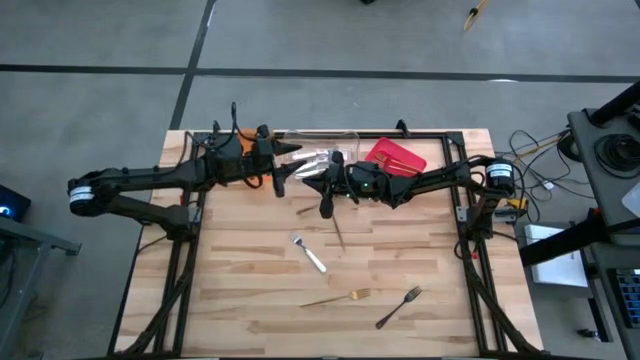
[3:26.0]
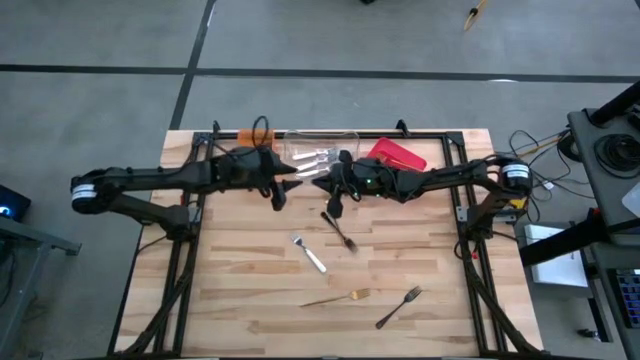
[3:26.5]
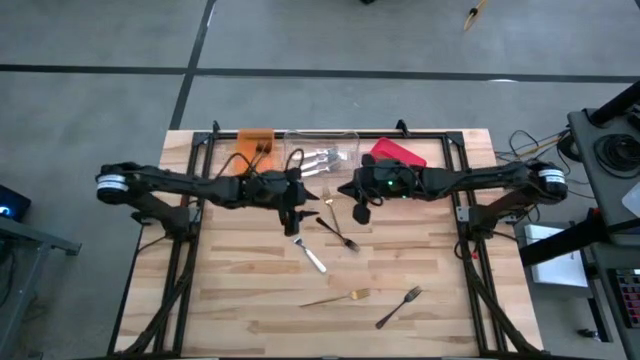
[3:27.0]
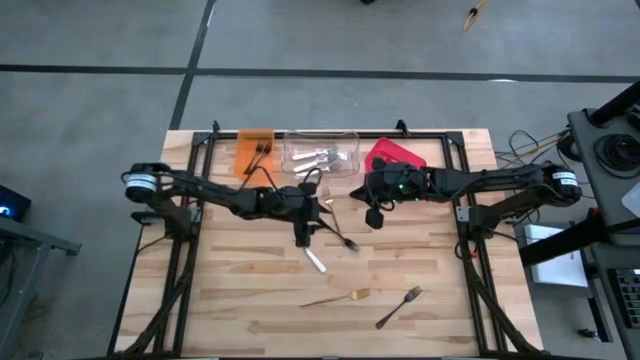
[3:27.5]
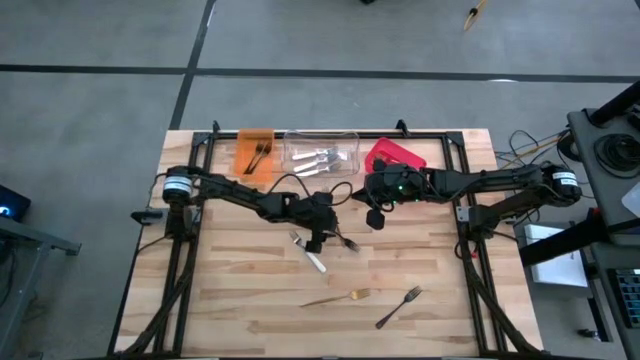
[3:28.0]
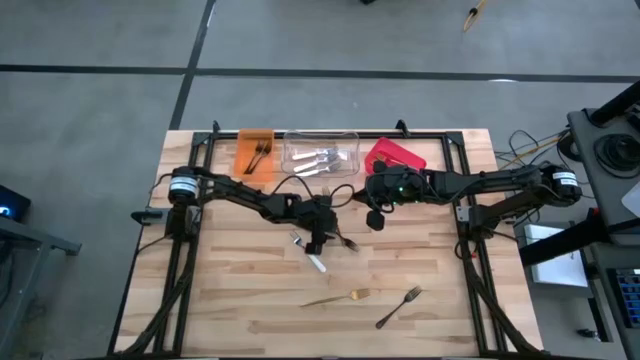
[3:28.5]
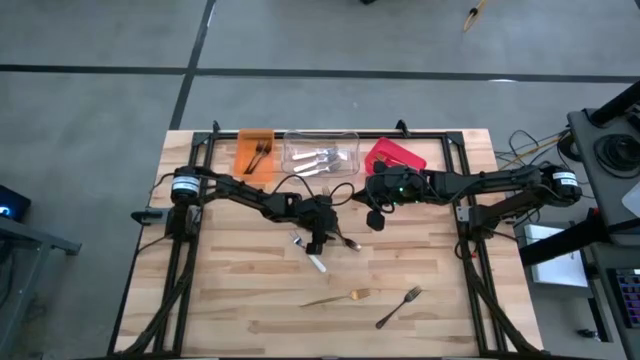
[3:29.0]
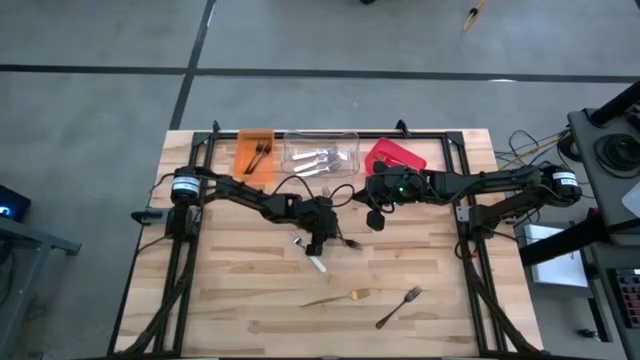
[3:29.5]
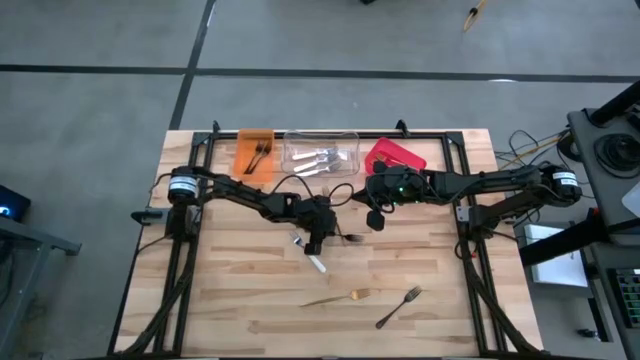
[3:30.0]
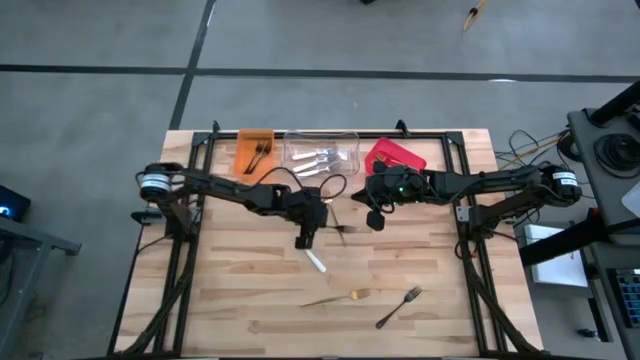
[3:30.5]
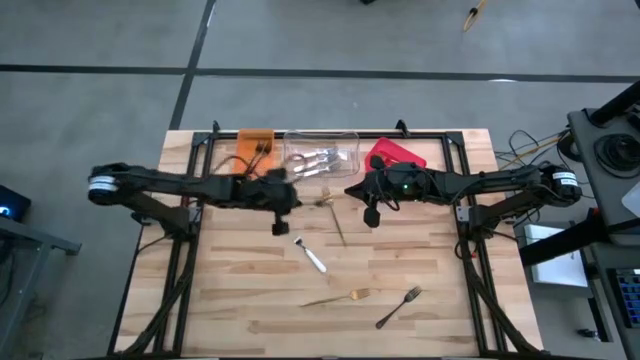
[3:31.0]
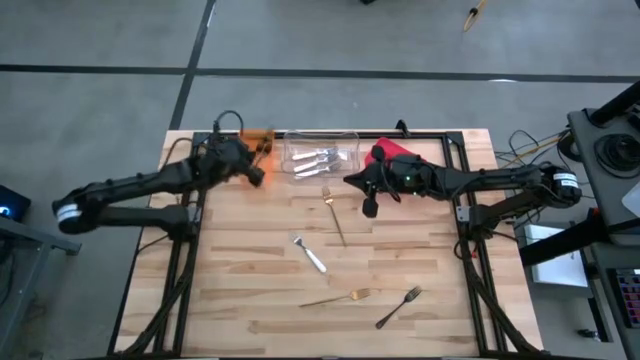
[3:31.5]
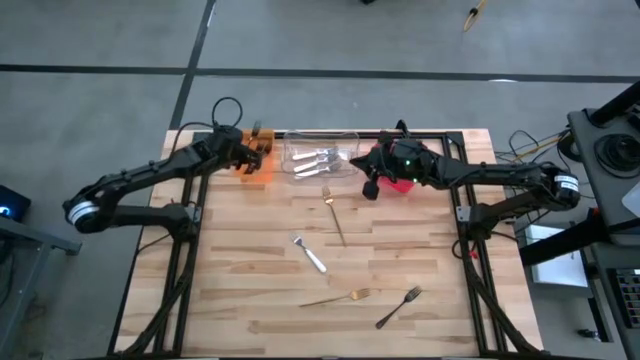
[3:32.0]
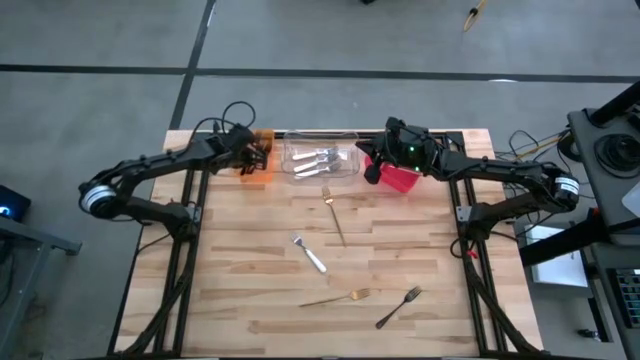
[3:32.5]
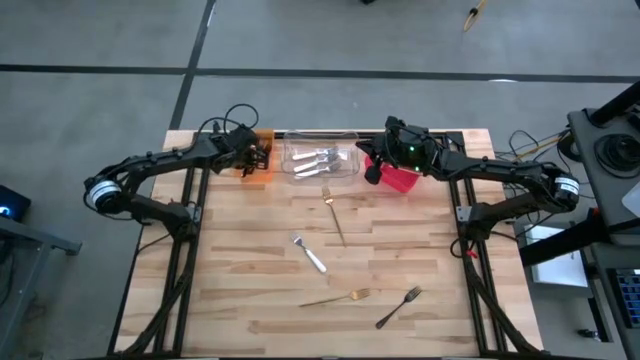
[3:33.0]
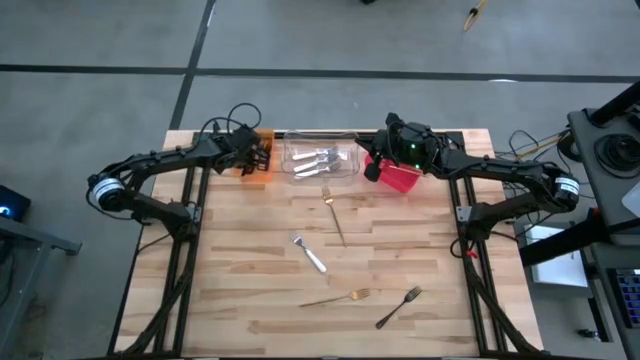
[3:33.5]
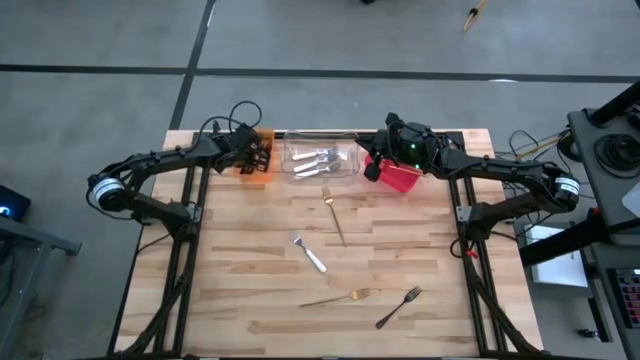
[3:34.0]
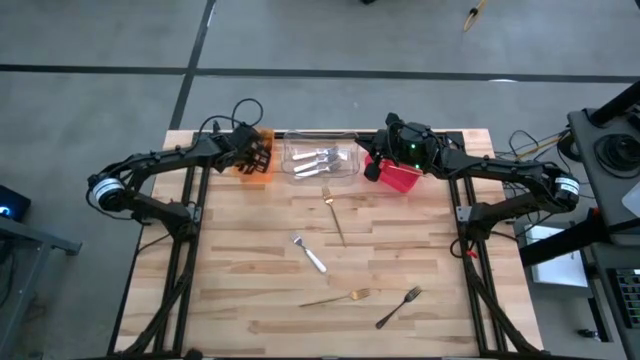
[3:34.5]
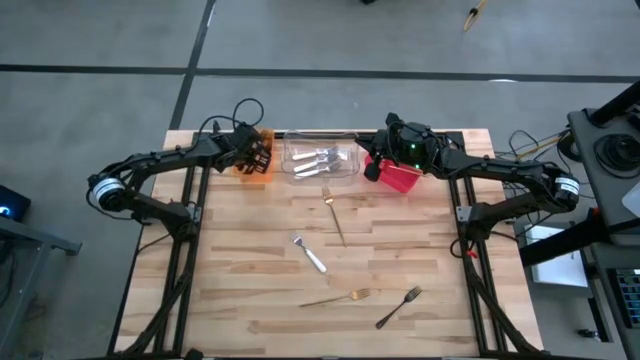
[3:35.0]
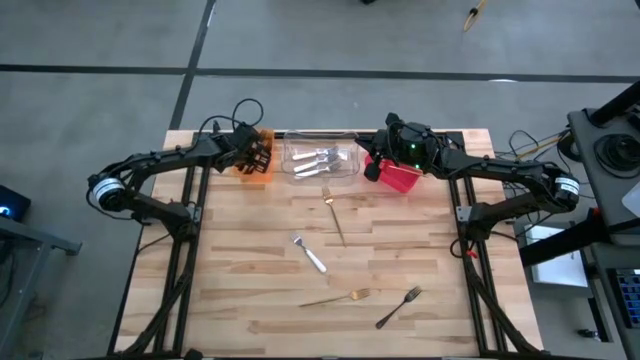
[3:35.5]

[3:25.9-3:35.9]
Task: Sort silverware by color (type)
Put the black fork into the orange bin

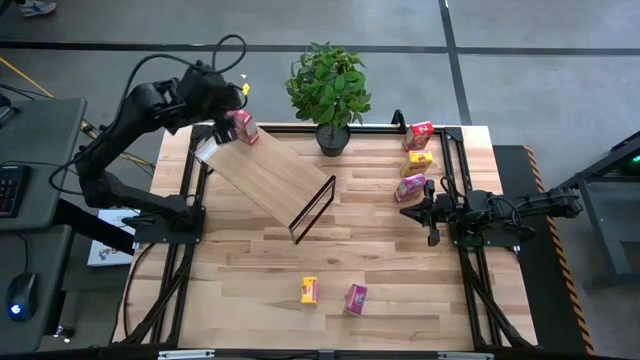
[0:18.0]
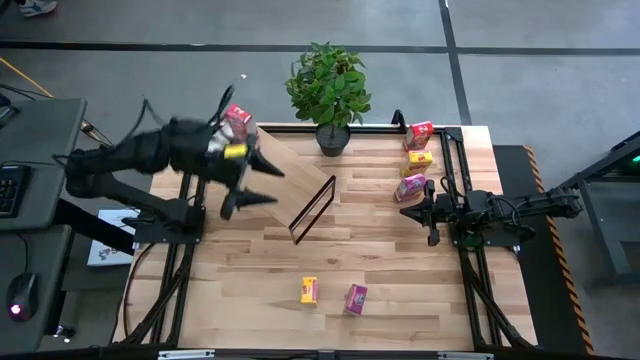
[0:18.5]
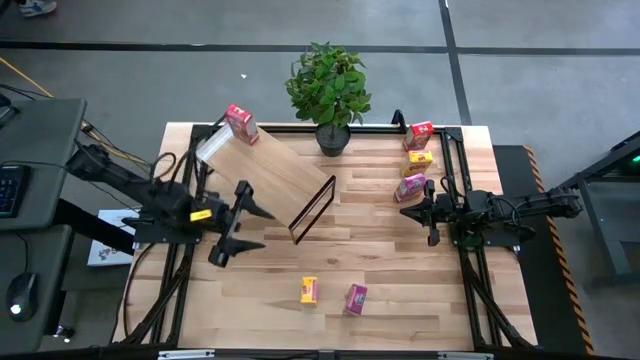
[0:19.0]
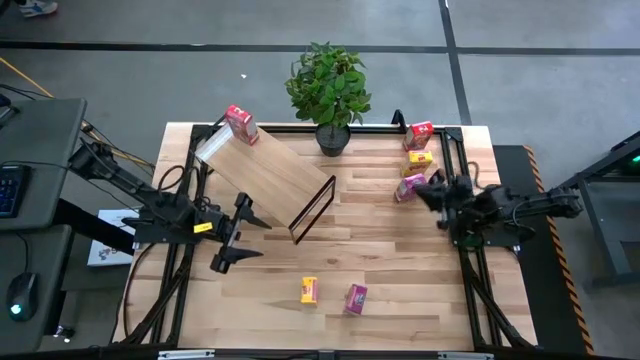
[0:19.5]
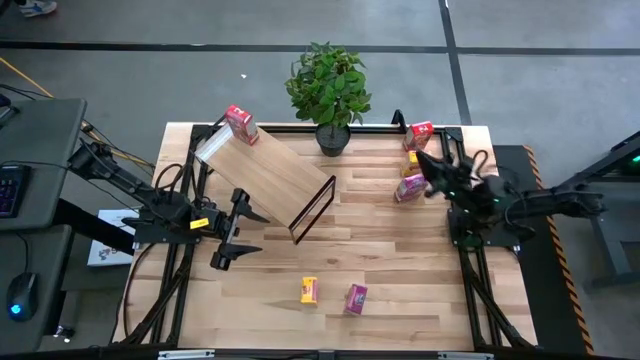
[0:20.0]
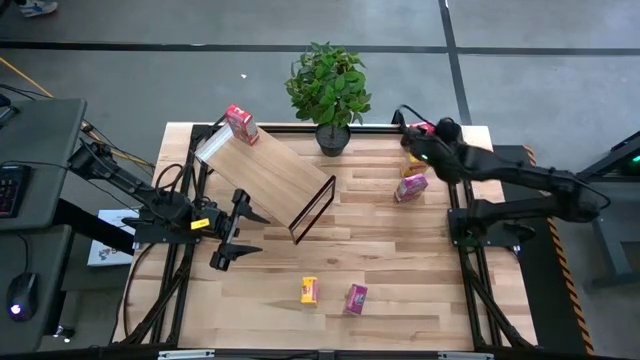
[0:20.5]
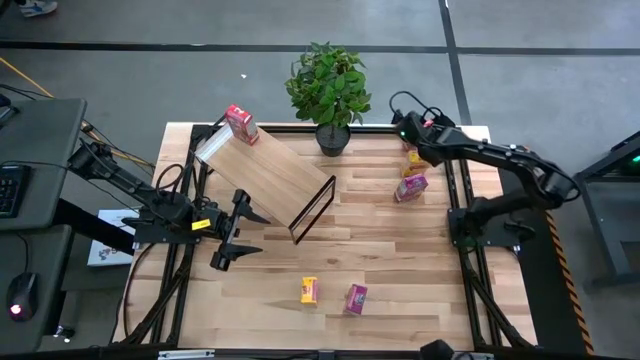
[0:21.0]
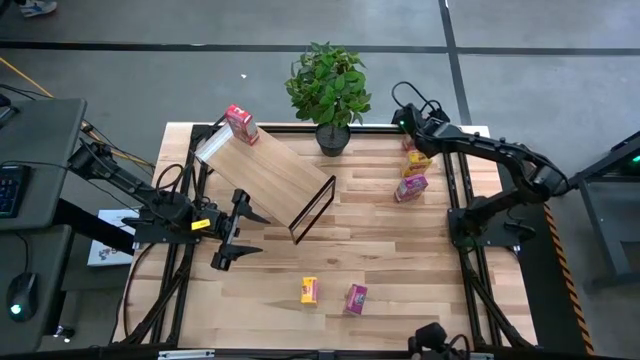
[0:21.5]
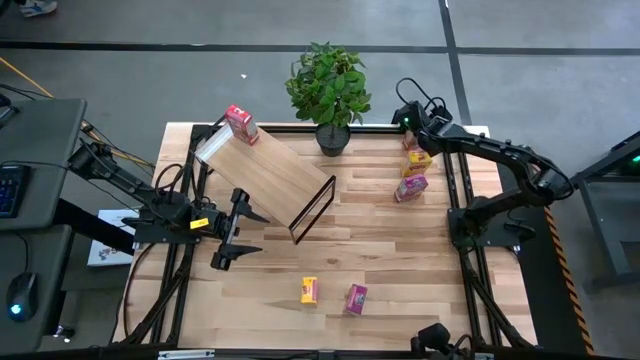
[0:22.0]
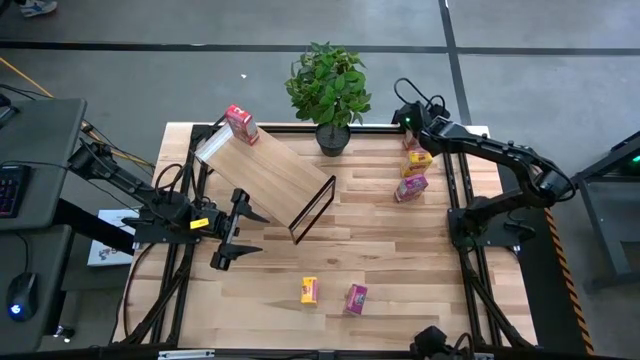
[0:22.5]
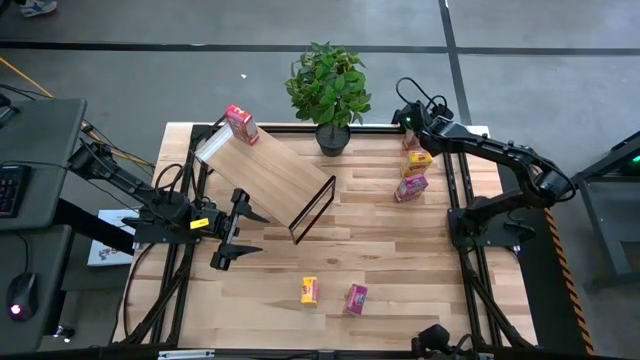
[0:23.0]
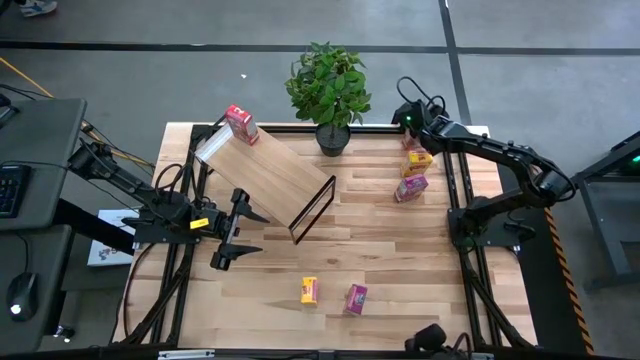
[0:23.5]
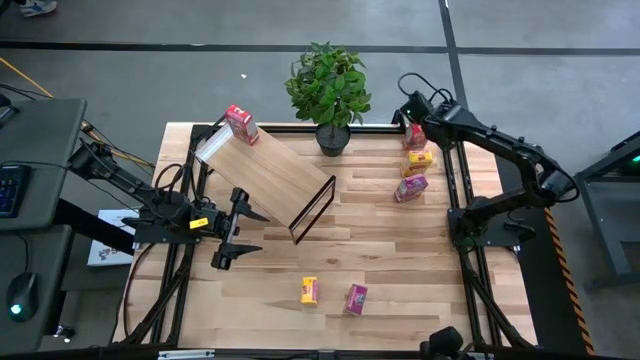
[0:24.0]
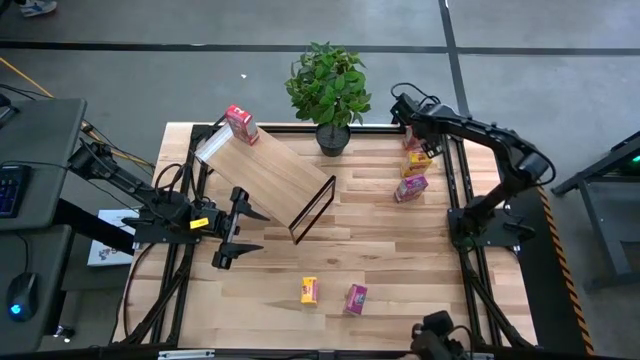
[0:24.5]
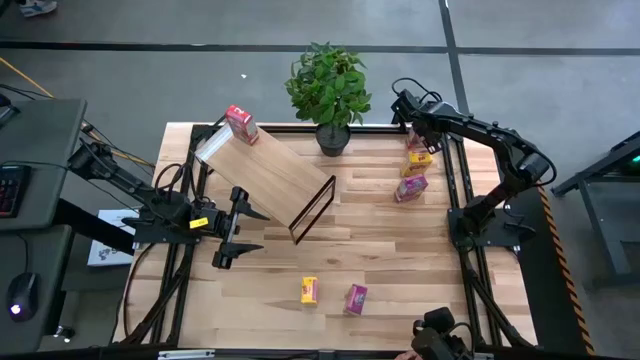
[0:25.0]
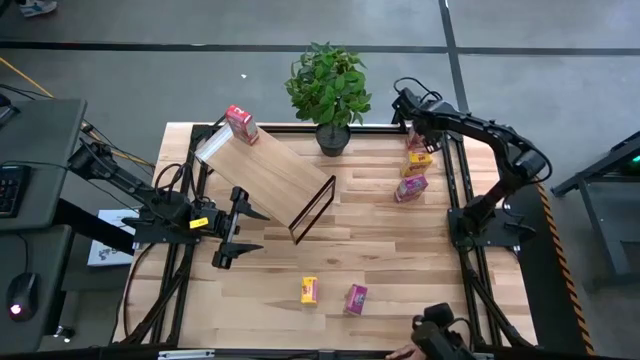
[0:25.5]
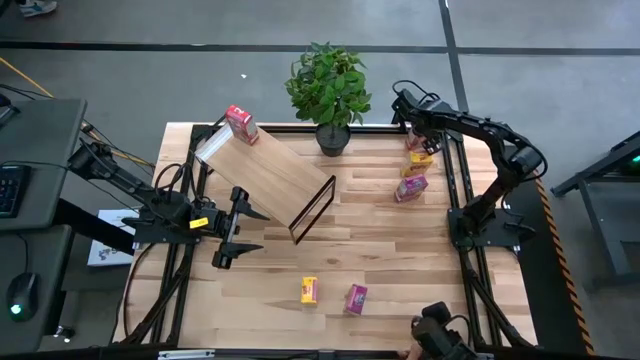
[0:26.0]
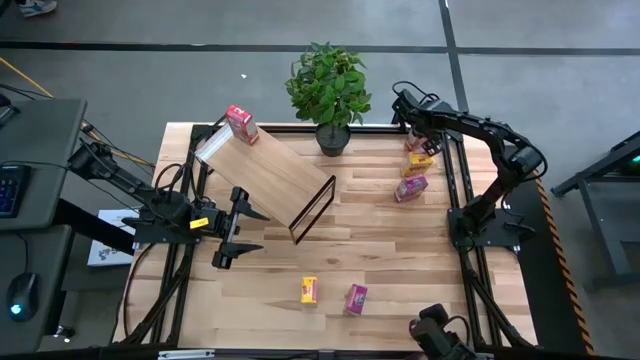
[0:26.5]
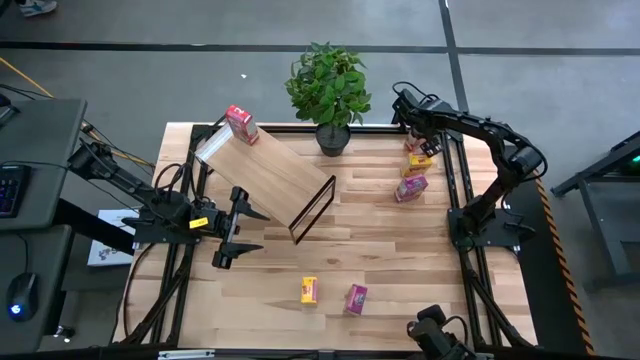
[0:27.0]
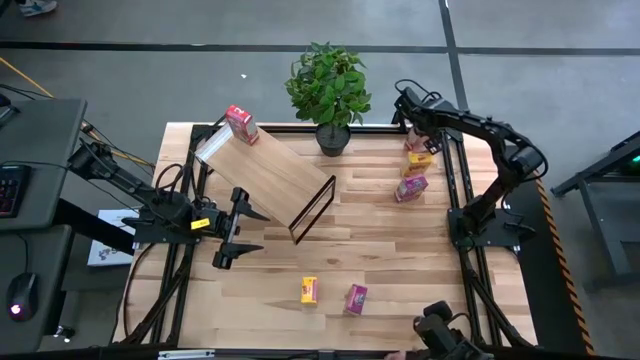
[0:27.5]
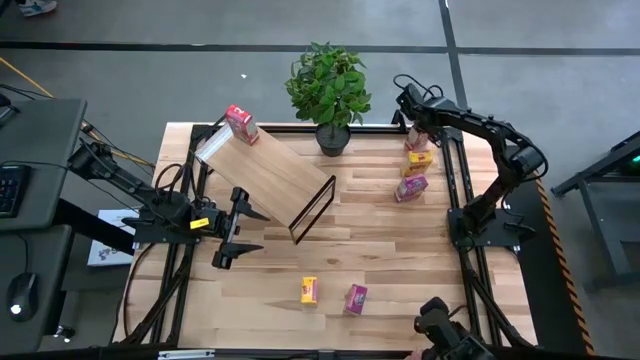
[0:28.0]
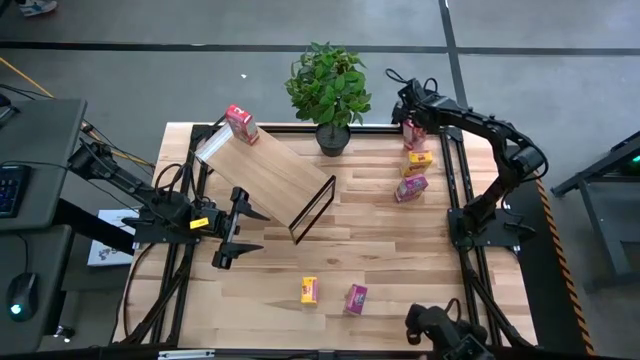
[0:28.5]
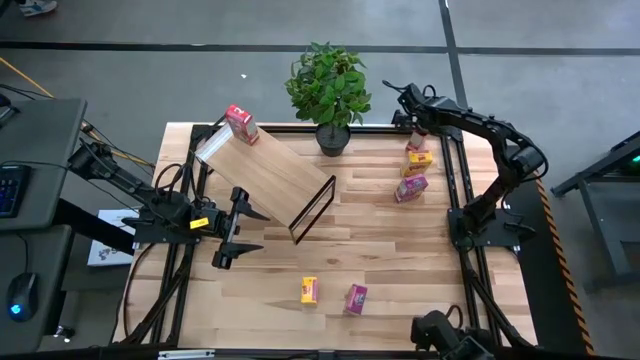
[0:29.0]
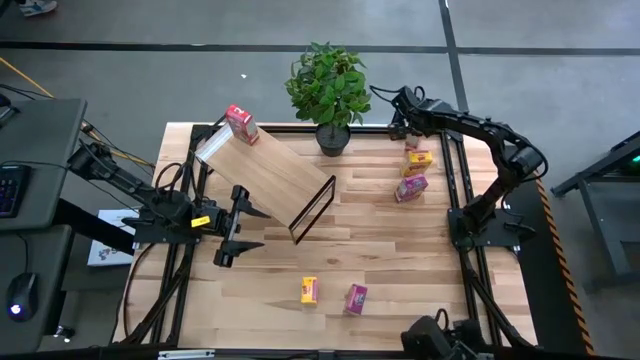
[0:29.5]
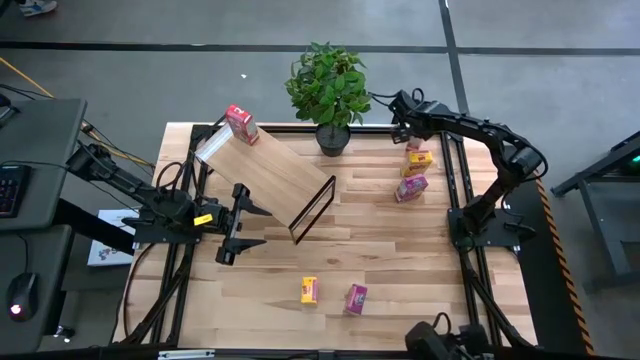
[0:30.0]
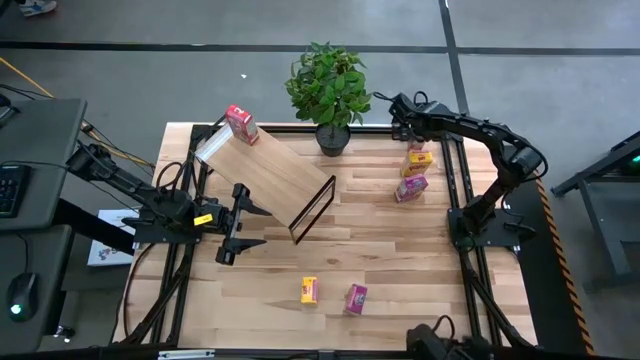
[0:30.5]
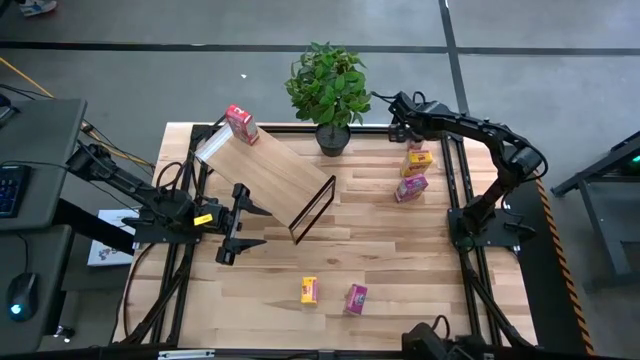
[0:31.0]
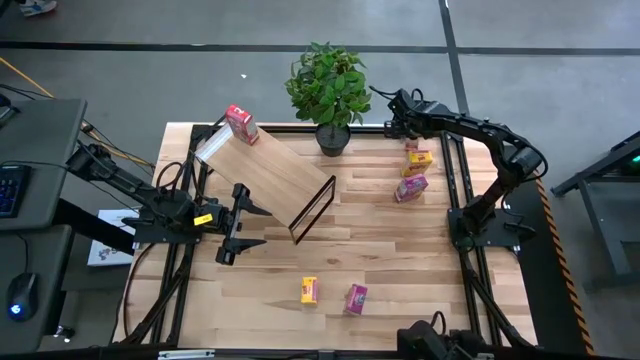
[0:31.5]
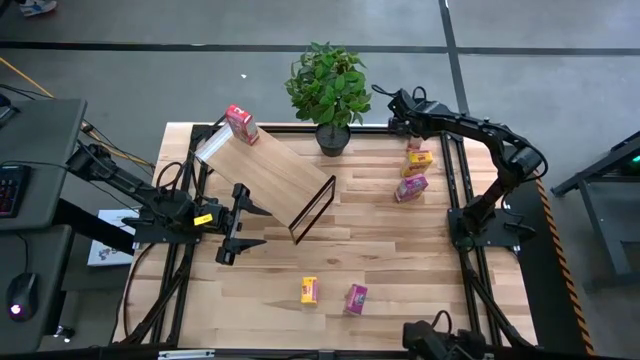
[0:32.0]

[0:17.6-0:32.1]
Task: Stack cereal on shelf
Put the red cereal box on the shelf aligned with the other red cereal box
